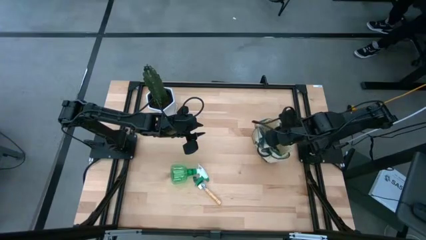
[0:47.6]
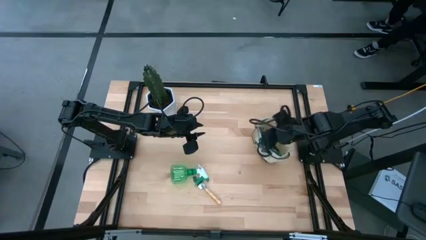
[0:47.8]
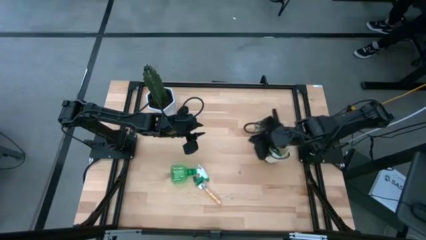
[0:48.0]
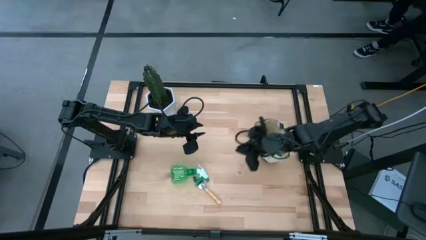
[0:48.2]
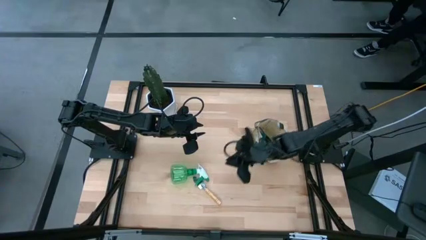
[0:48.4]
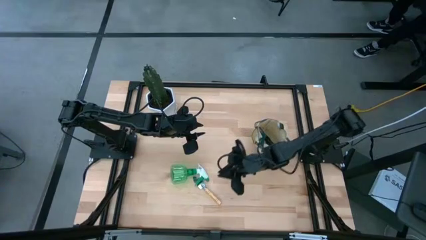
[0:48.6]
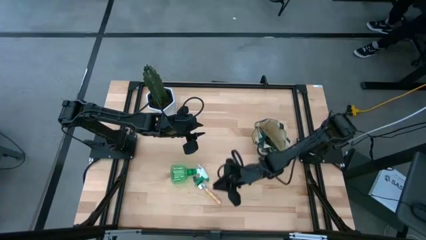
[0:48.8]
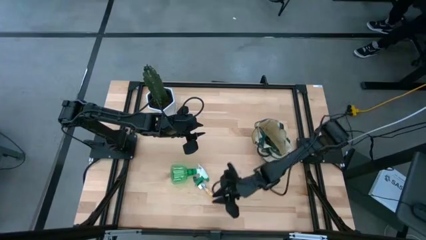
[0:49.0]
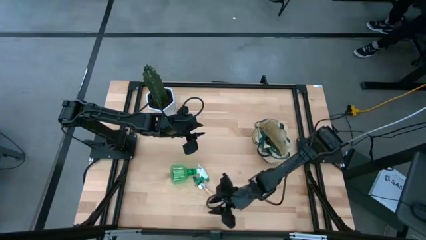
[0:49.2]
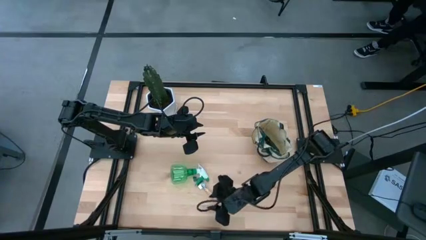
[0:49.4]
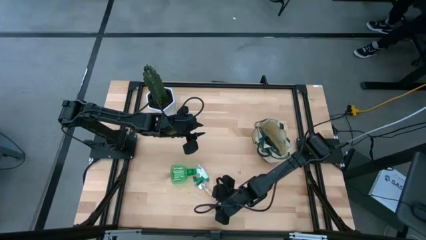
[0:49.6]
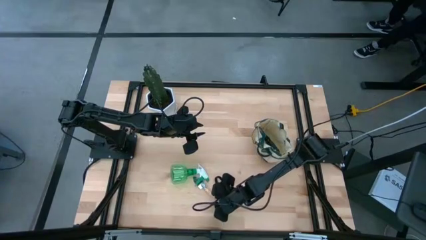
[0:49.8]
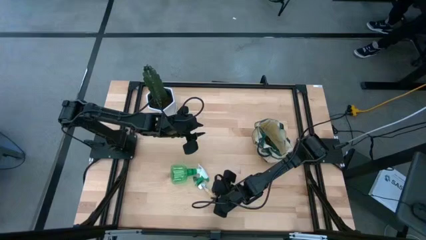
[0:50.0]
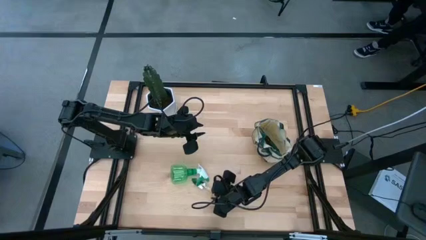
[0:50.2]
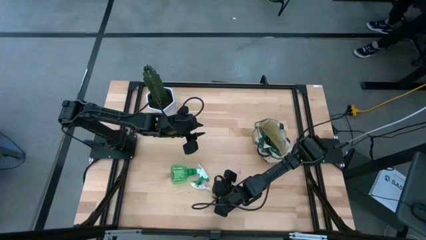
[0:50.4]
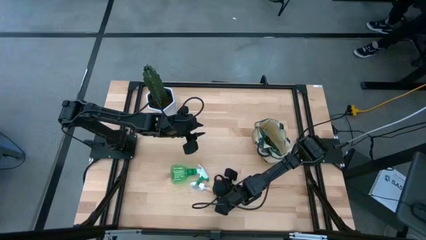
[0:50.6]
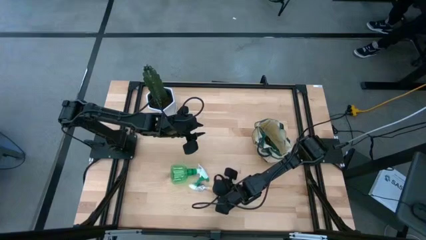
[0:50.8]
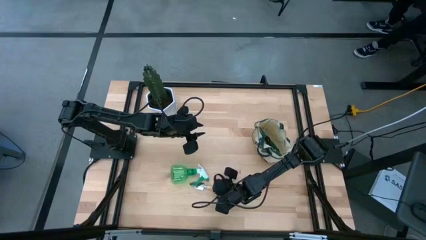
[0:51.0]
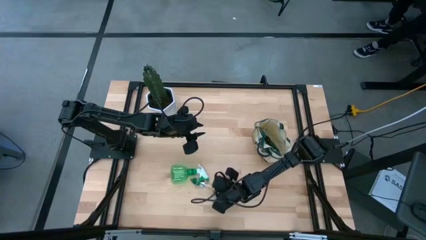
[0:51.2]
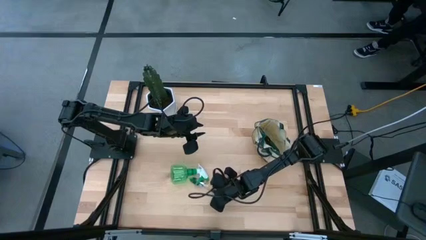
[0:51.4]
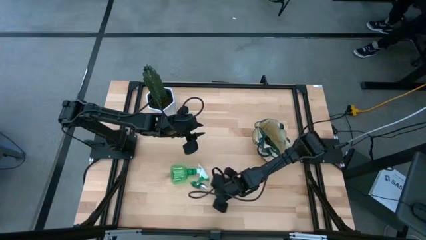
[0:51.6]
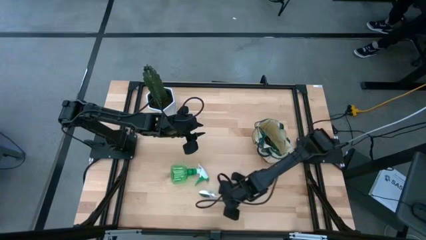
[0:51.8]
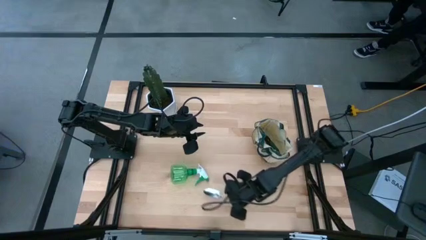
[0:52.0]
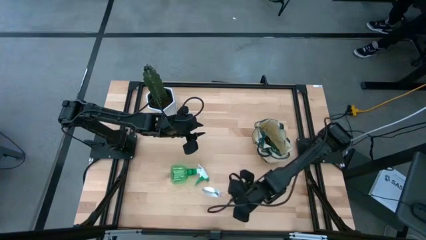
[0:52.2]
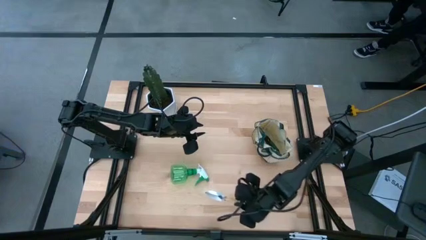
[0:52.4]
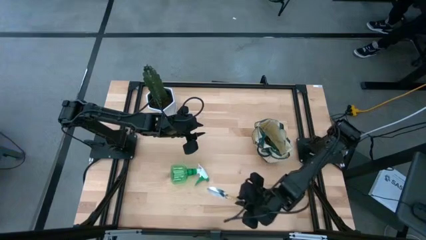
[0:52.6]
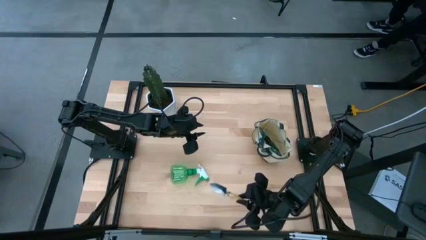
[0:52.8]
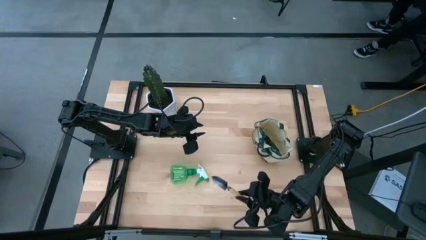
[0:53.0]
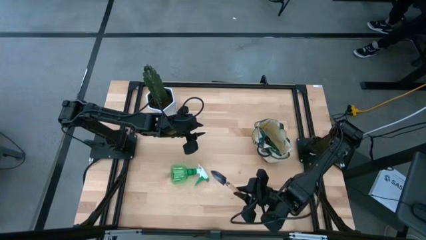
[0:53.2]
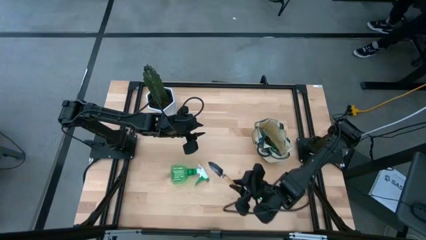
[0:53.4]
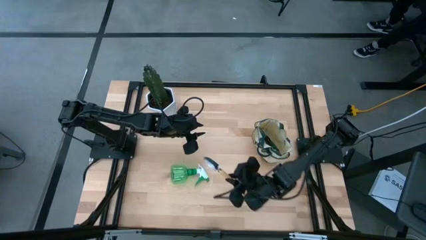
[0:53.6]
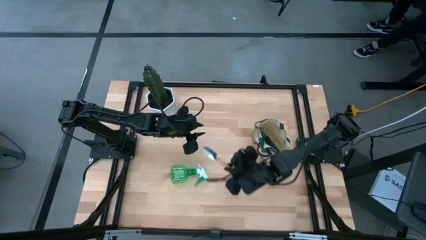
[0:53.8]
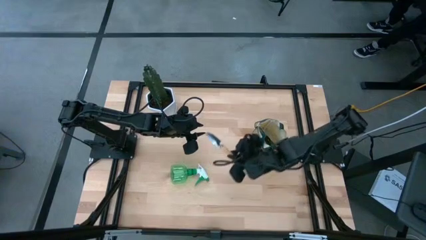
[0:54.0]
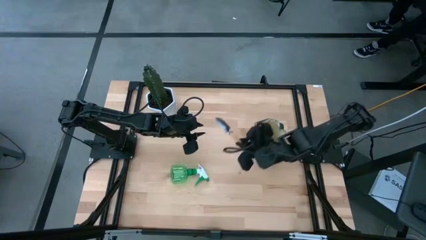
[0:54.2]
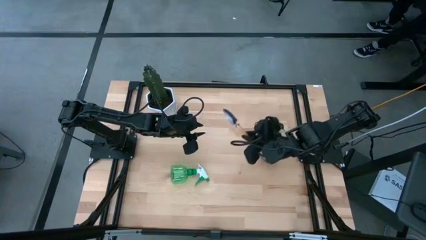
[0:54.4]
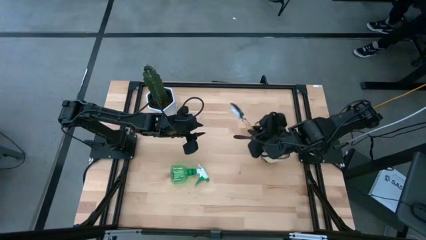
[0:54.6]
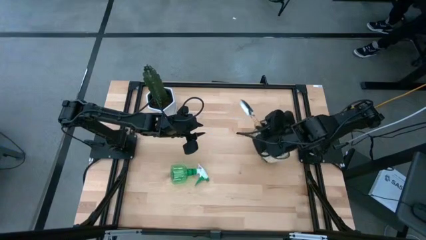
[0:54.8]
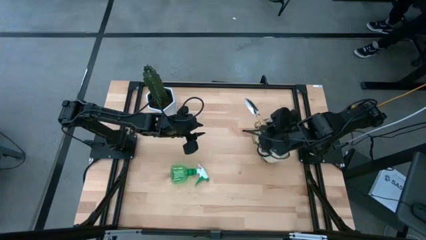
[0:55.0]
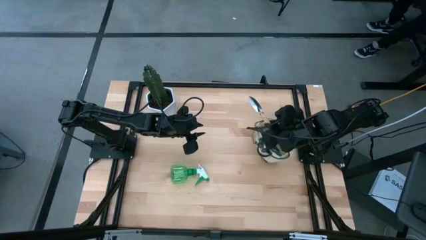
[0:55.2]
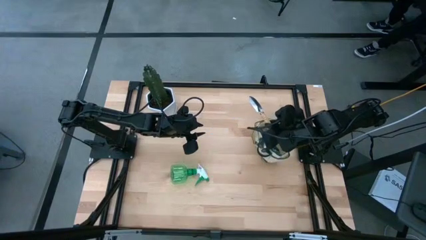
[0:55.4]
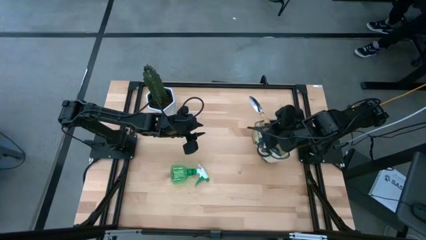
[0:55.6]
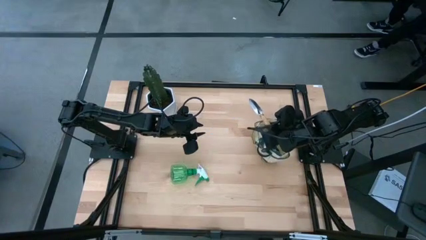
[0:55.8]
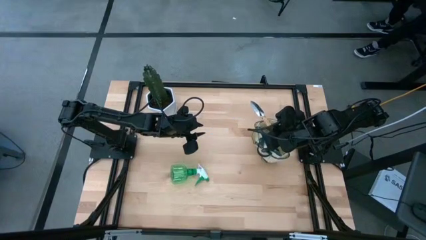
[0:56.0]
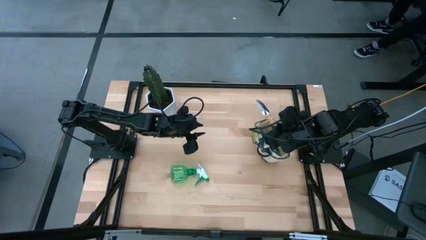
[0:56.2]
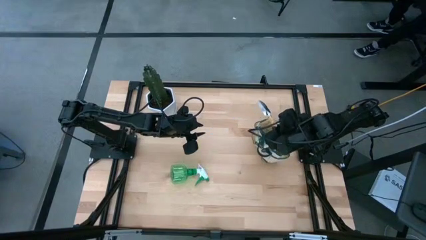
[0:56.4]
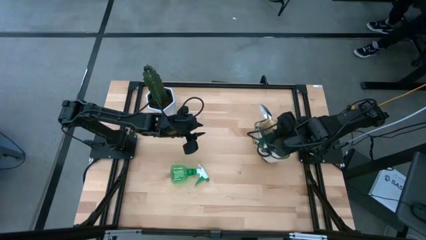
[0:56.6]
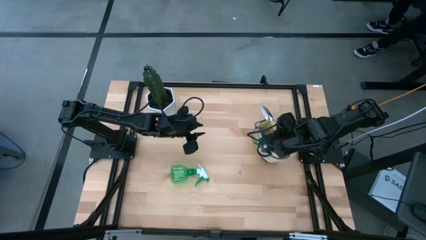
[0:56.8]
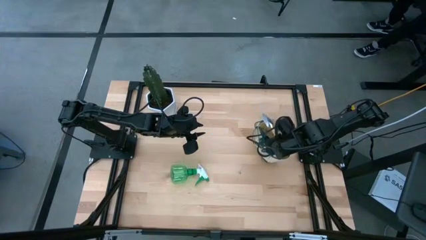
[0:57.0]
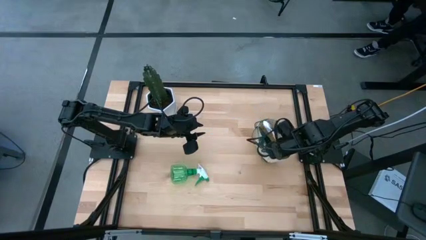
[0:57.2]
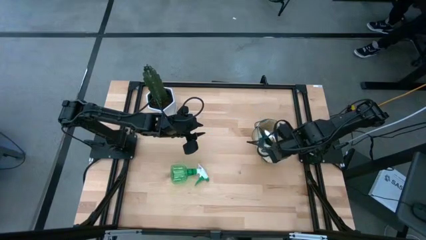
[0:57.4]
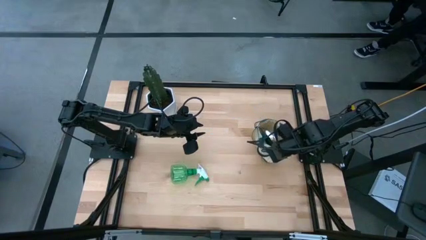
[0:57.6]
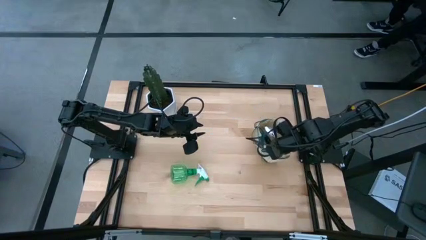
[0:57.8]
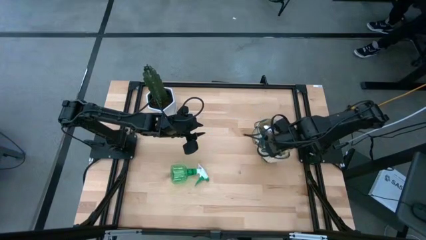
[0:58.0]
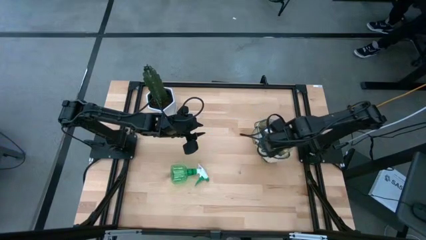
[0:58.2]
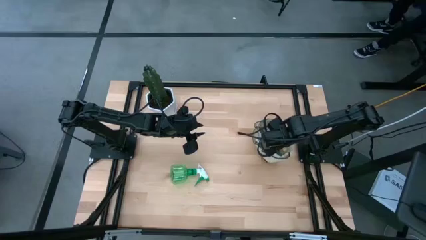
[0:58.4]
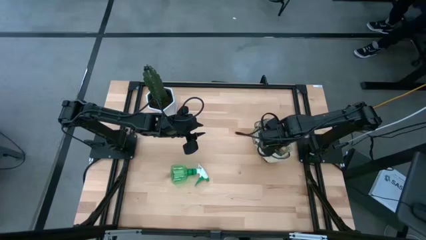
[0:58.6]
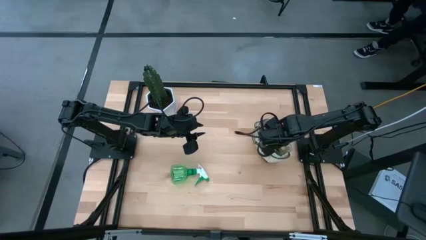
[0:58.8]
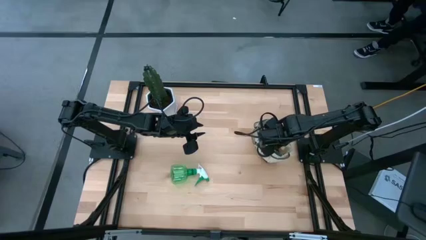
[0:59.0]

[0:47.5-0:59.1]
Task: Pick & Place Garden tools in Gardening bag
Put the brown trowel into the gardening bag

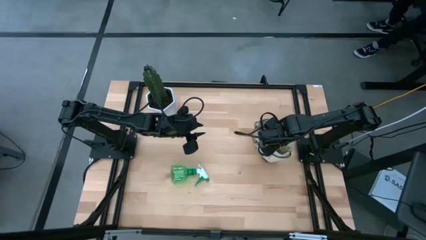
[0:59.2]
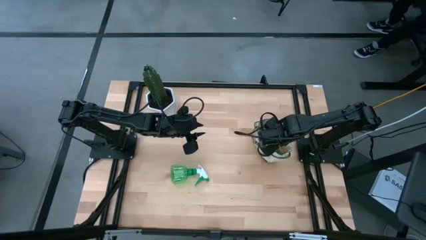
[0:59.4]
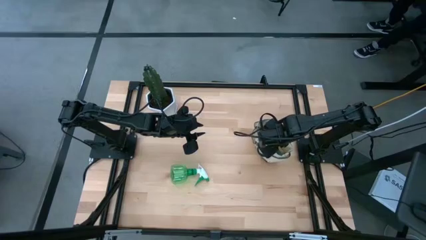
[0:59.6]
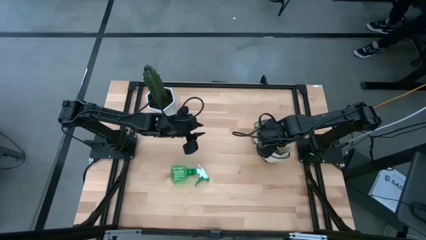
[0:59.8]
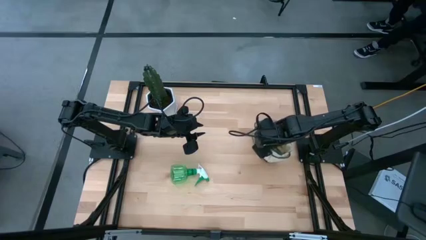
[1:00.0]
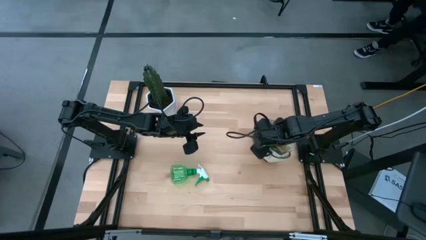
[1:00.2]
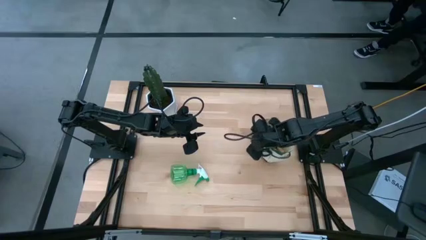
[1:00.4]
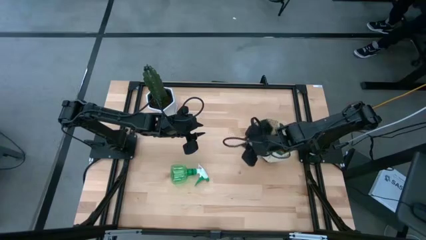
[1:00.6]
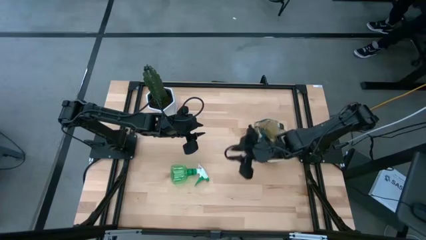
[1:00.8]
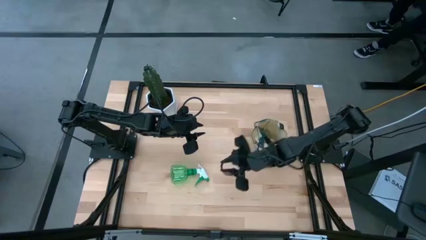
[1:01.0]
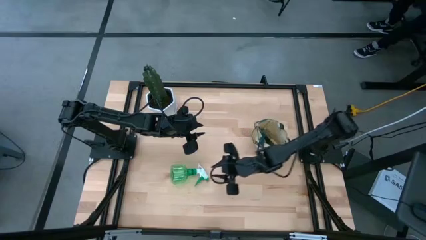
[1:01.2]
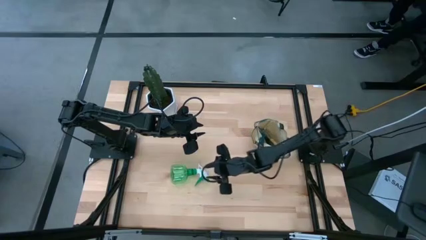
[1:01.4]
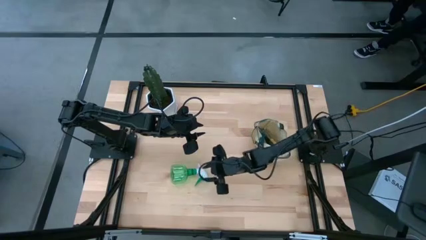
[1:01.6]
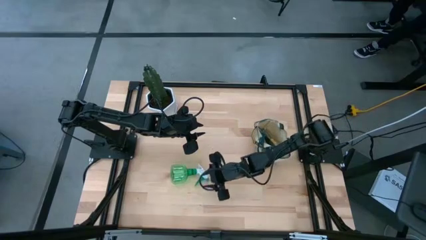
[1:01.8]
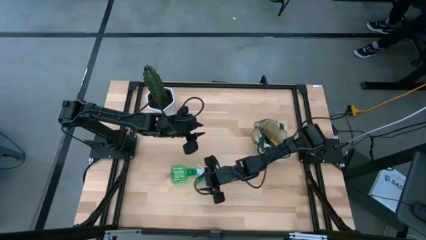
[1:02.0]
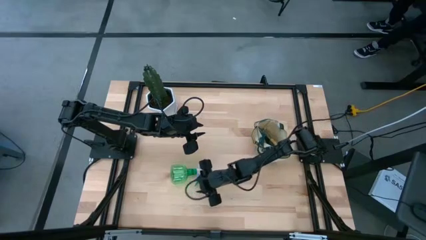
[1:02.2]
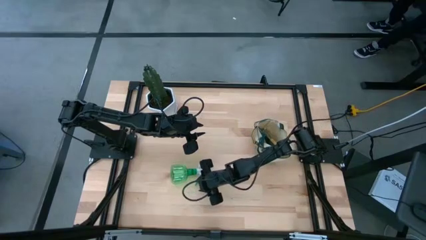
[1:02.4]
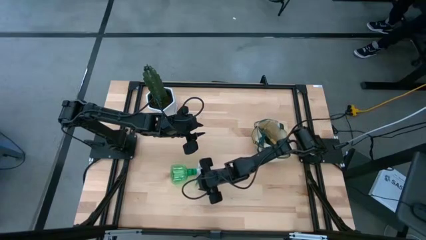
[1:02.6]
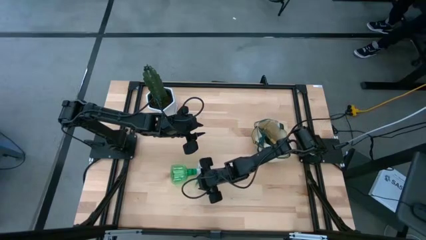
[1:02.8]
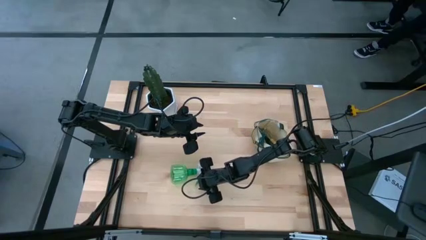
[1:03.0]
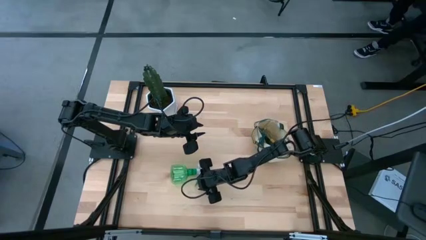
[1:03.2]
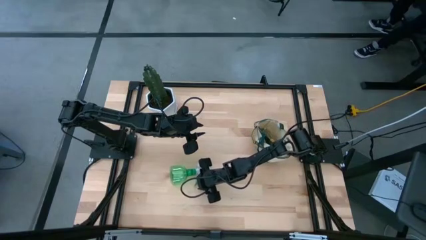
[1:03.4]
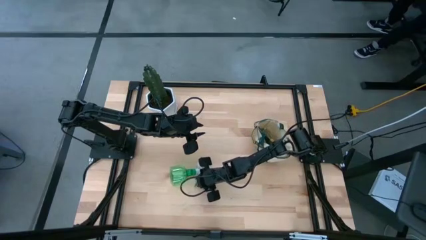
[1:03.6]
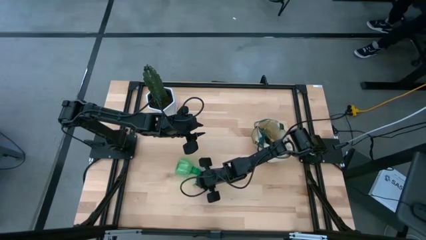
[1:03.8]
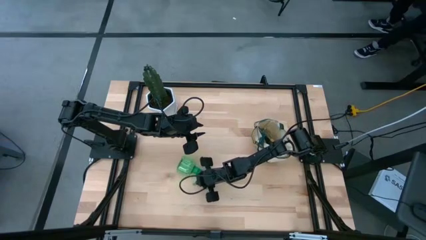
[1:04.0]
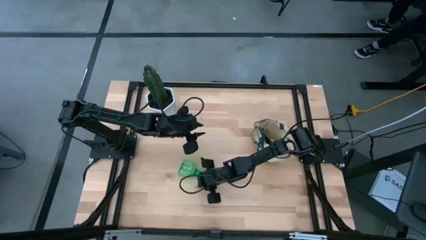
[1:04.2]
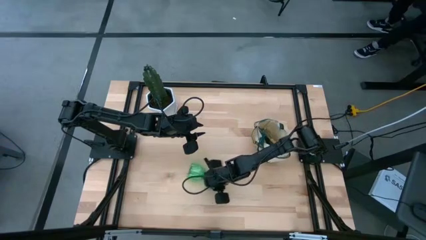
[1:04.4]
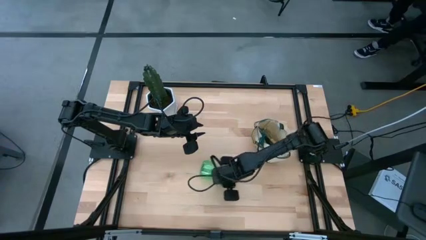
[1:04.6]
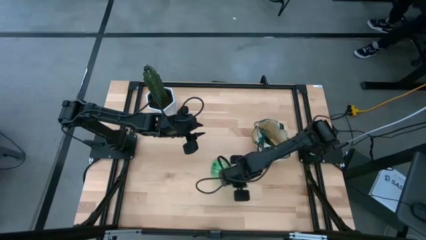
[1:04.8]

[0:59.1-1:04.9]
Put the green spray bottle into the gardening bag
